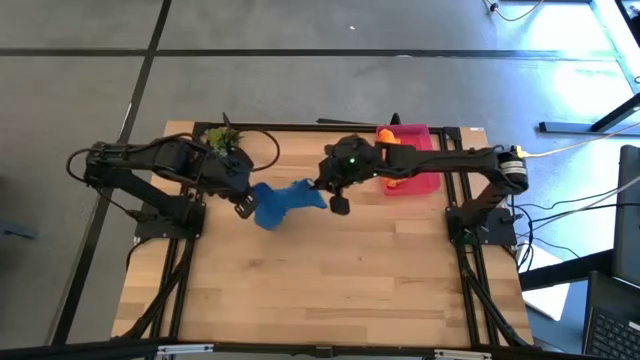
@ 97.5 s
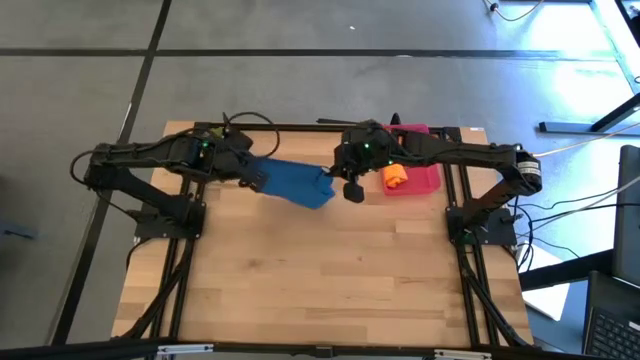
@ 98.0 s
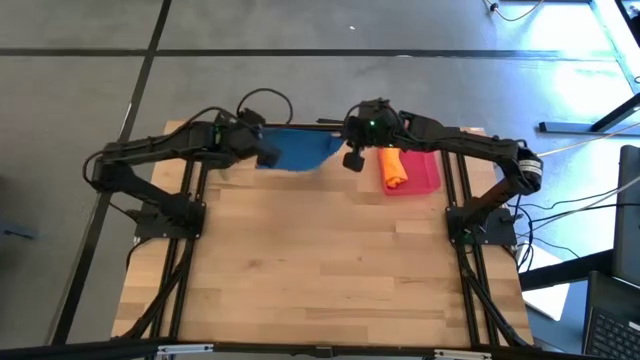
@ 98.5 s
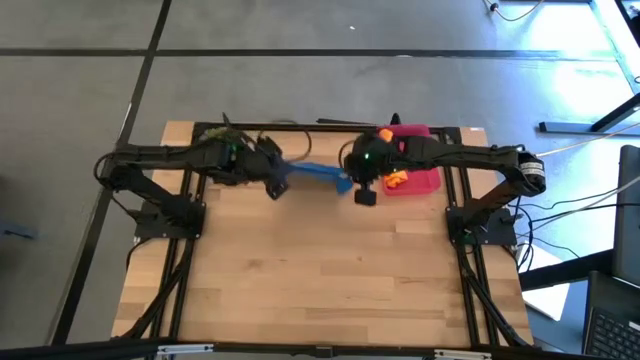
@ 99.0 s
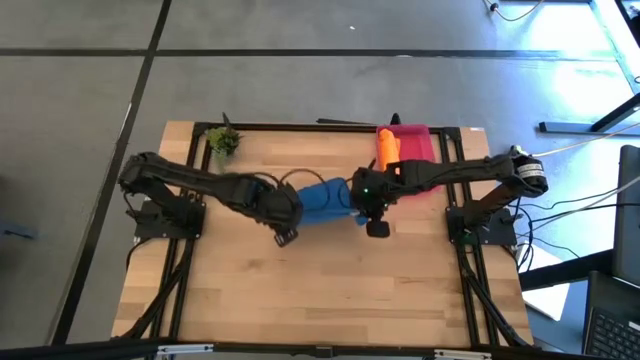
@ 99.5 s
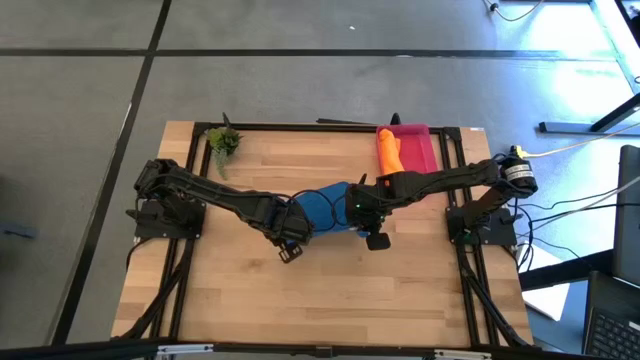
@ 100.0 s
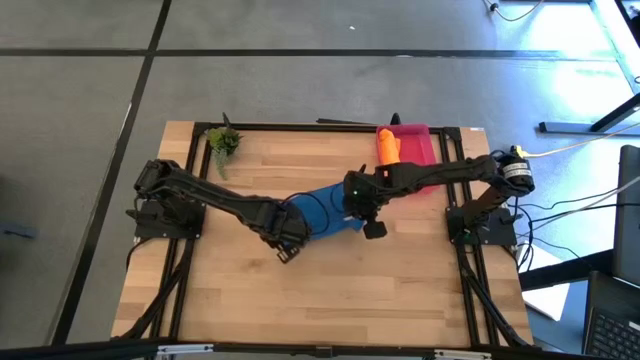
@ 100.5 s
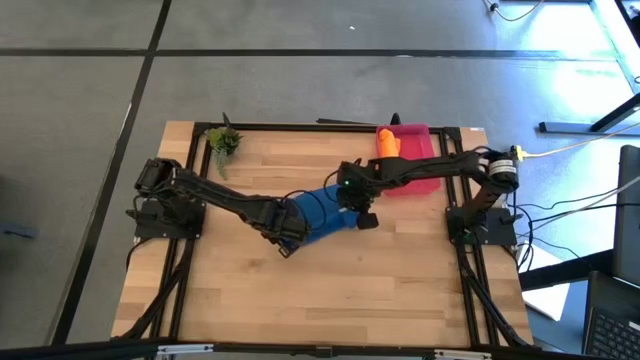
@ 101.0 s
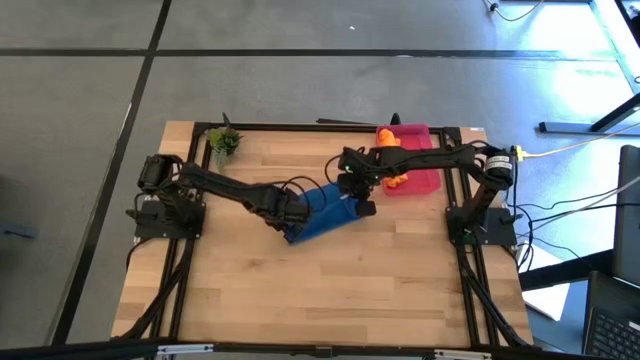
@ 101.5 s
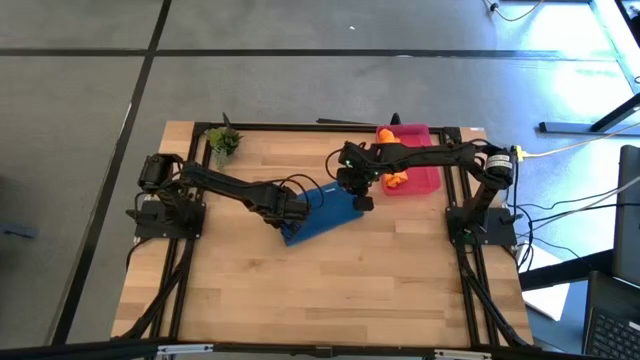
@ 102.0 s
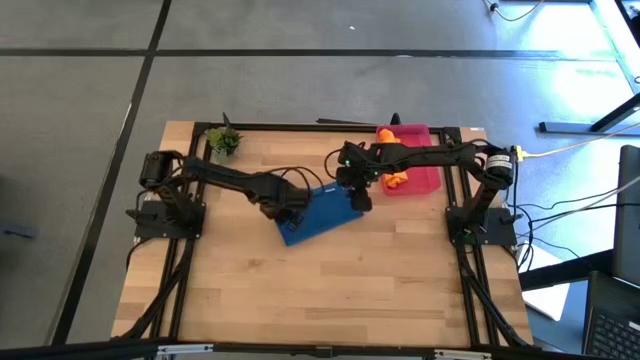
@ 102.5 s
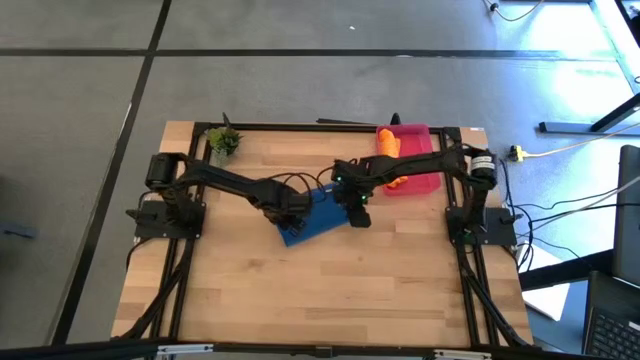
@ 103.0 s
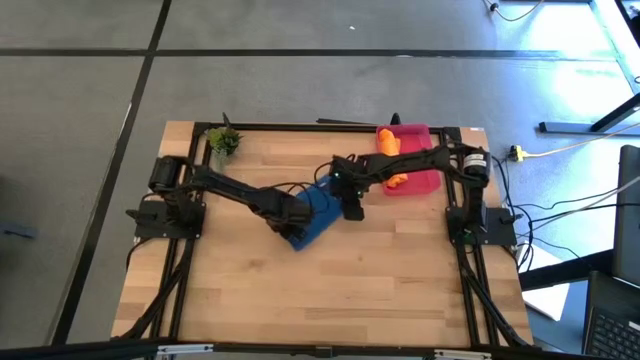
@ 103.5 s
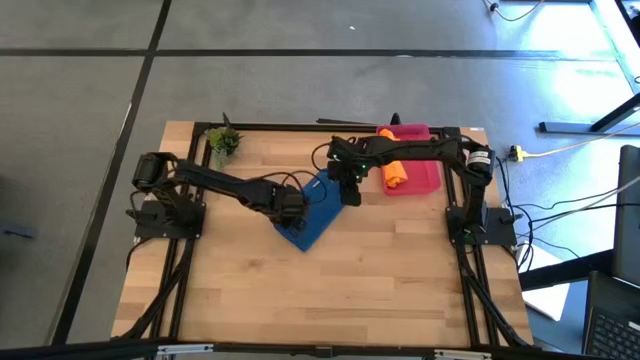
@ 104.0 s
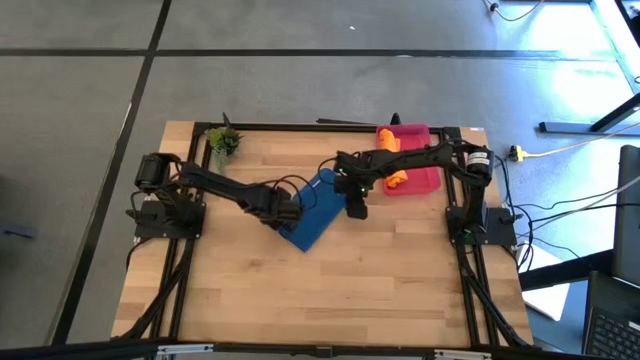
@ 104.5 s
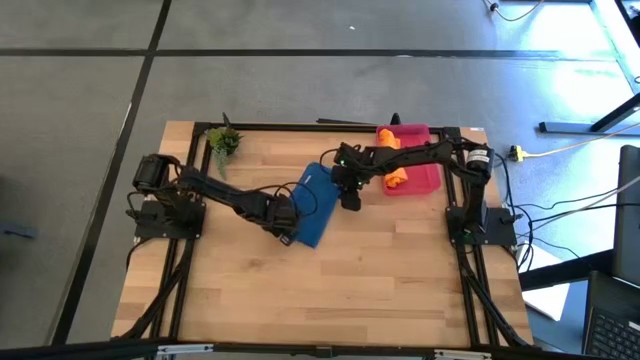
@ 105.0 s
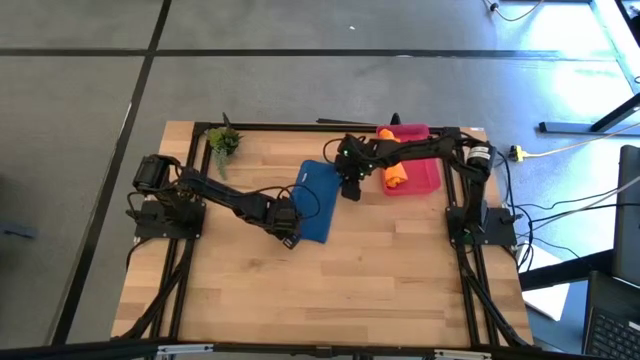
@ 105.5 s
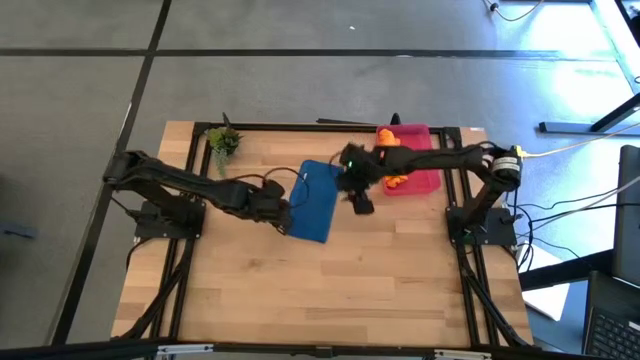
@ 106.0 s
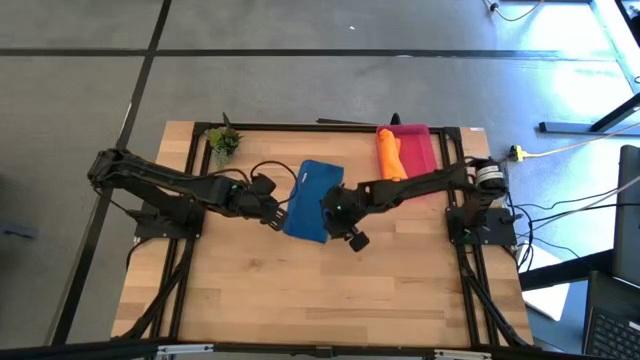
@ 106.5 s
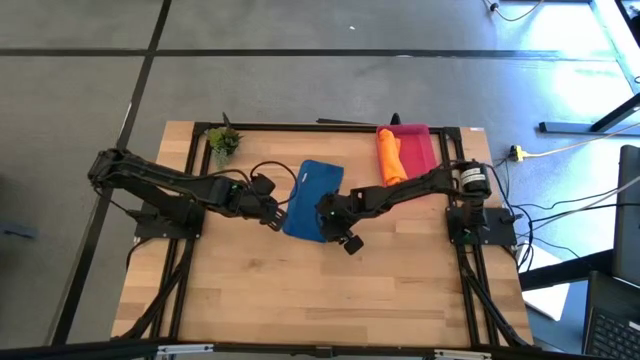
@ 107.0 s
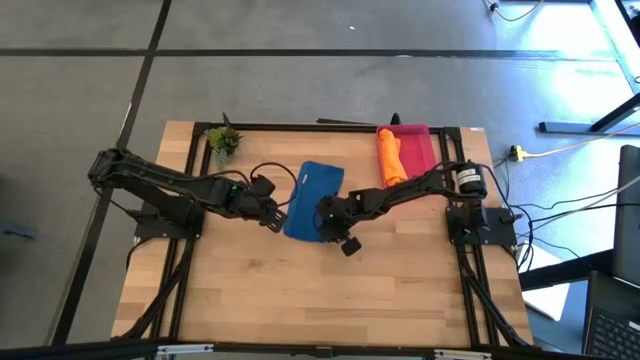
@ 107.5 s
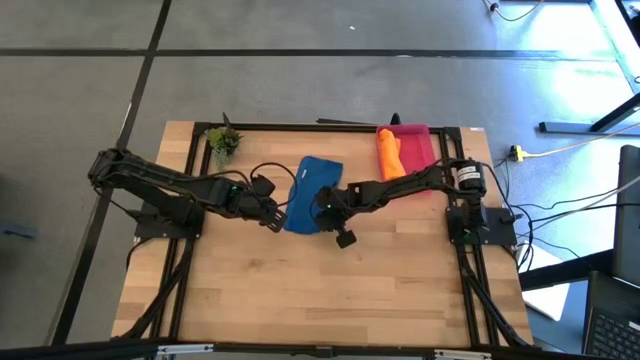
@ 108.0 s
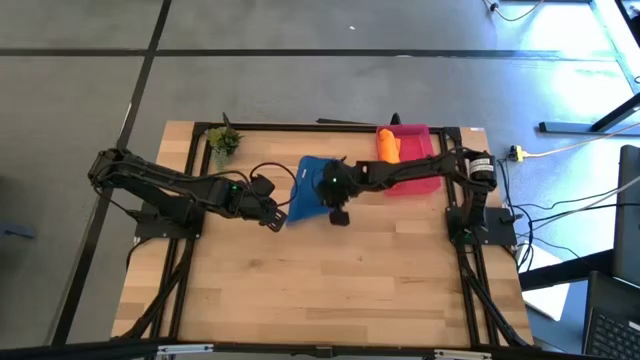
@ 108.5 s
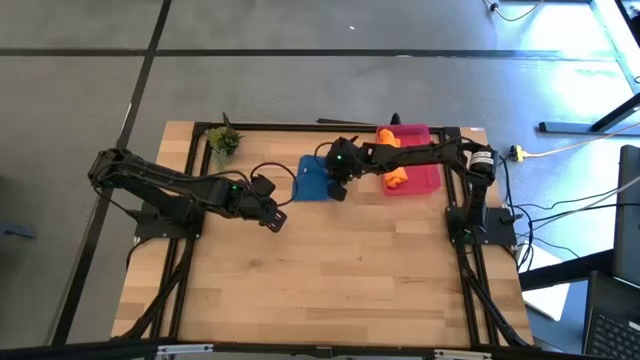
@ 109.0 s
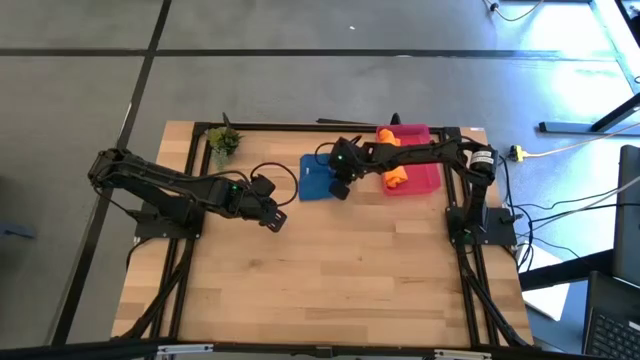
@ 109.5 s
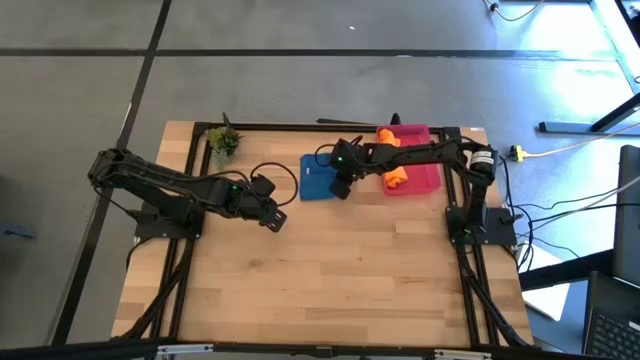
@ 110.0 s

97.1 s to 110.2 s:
Task: Roll microfiber towels into tight, uniform cylinder then place into a basket
Fold the blue microfiber towel

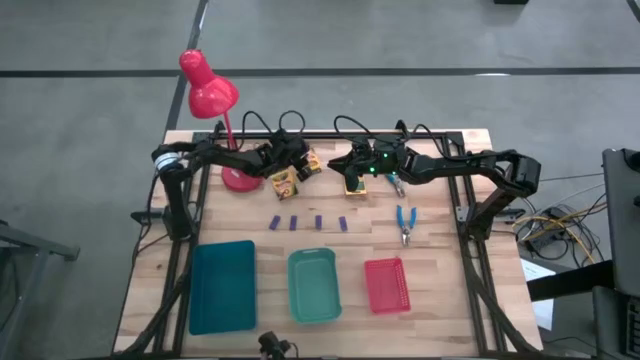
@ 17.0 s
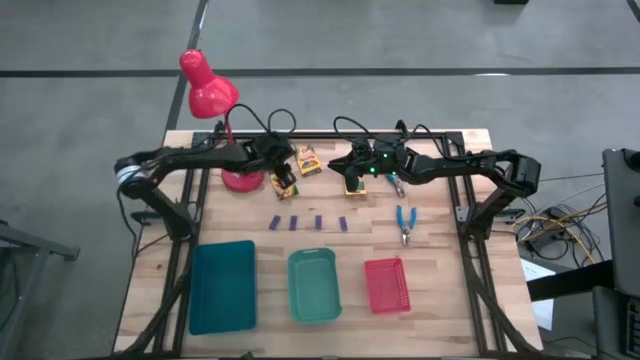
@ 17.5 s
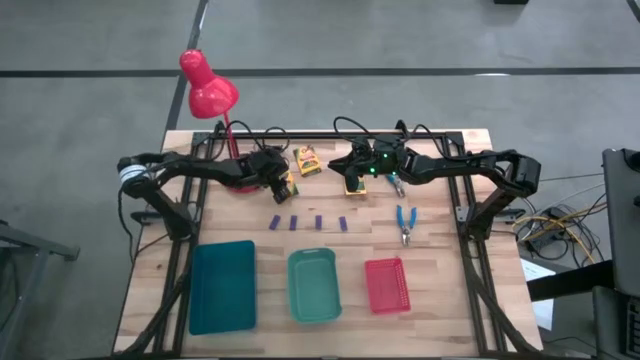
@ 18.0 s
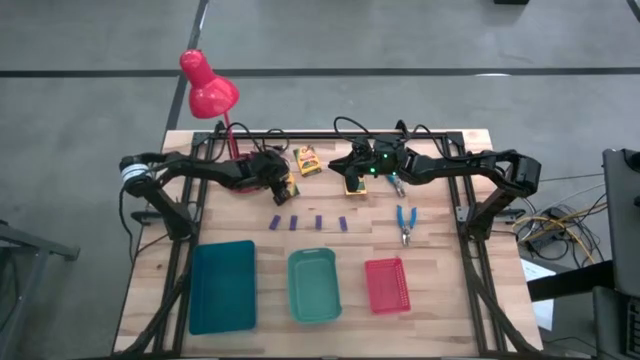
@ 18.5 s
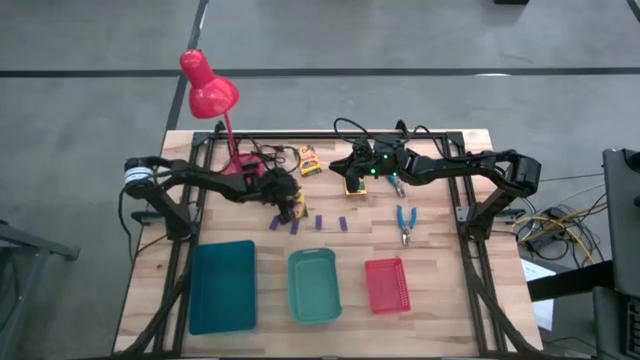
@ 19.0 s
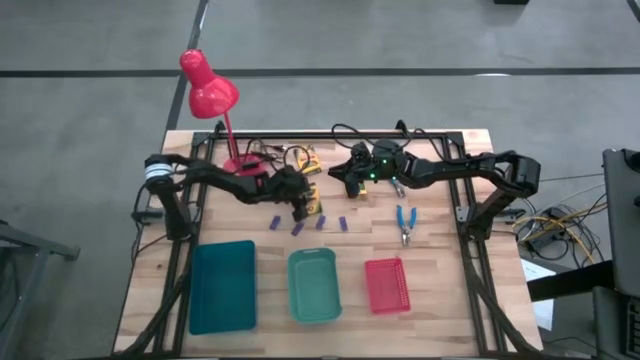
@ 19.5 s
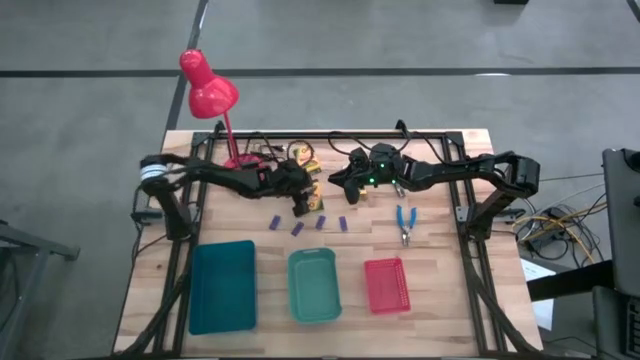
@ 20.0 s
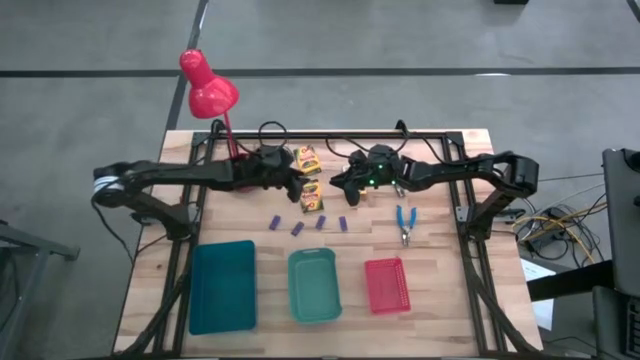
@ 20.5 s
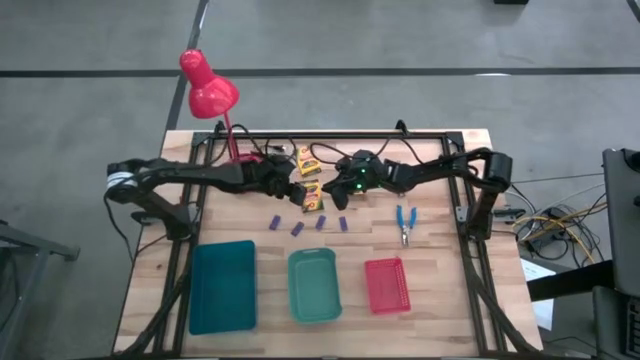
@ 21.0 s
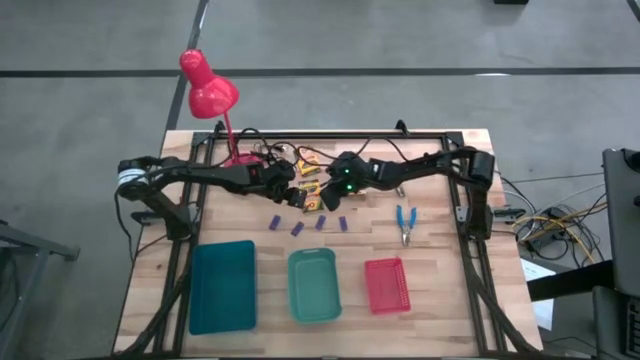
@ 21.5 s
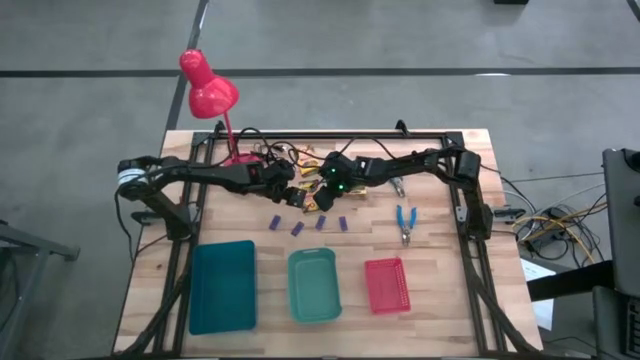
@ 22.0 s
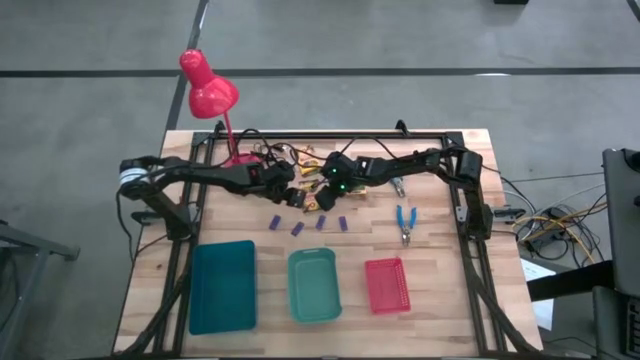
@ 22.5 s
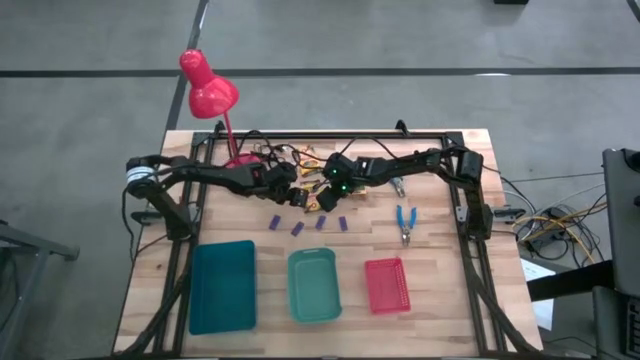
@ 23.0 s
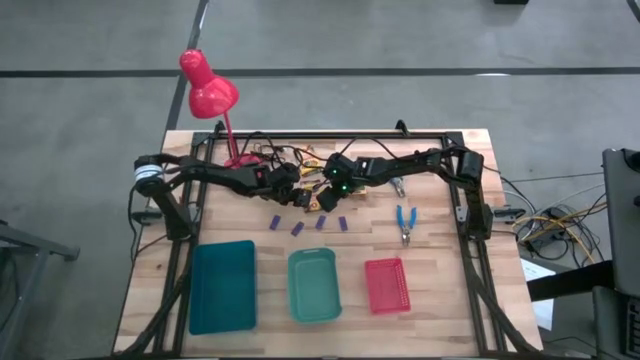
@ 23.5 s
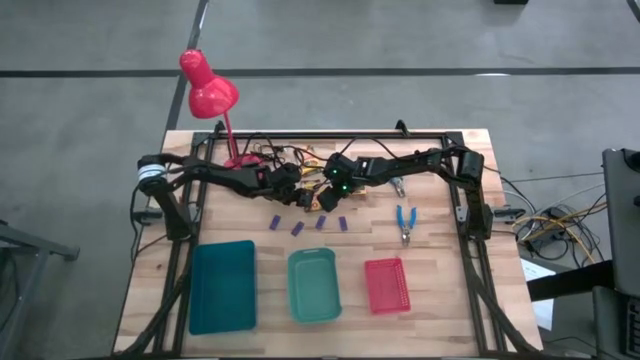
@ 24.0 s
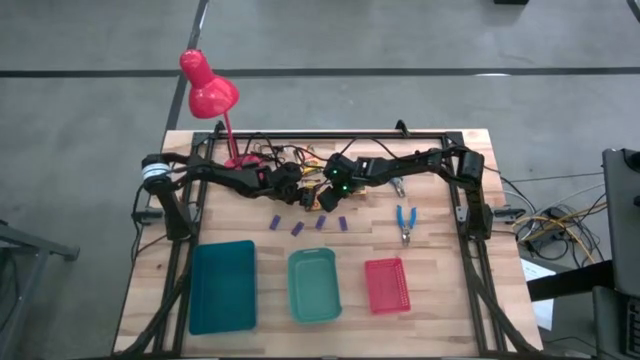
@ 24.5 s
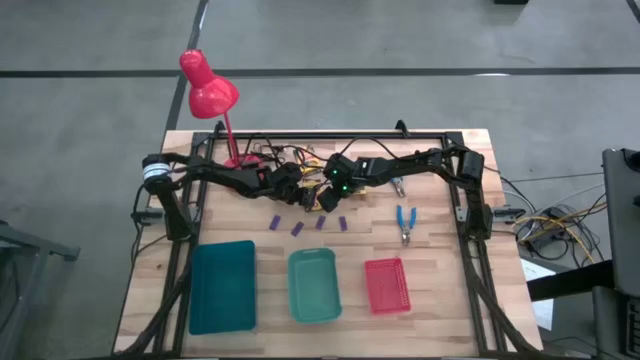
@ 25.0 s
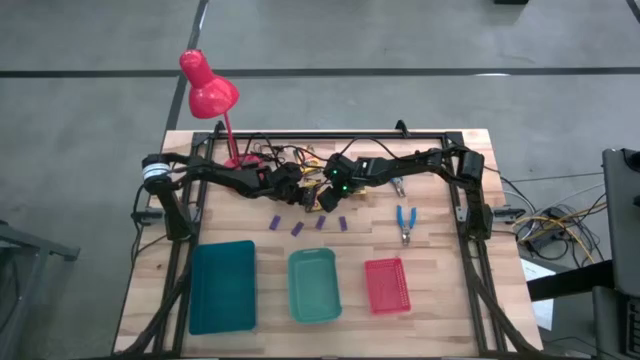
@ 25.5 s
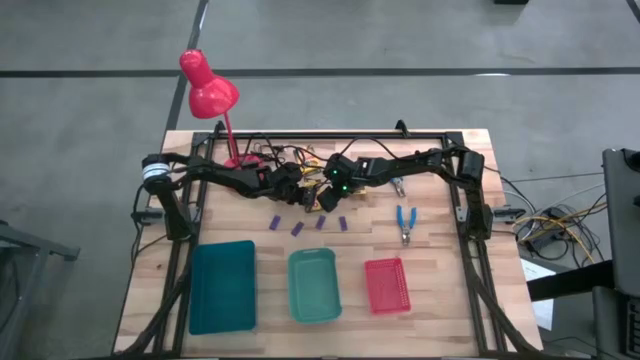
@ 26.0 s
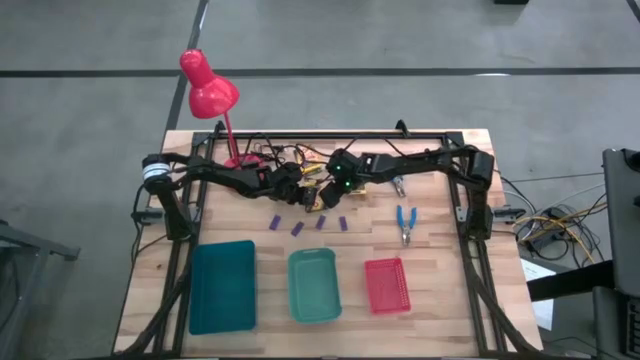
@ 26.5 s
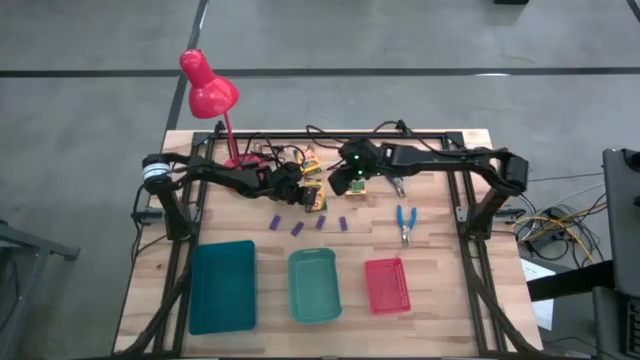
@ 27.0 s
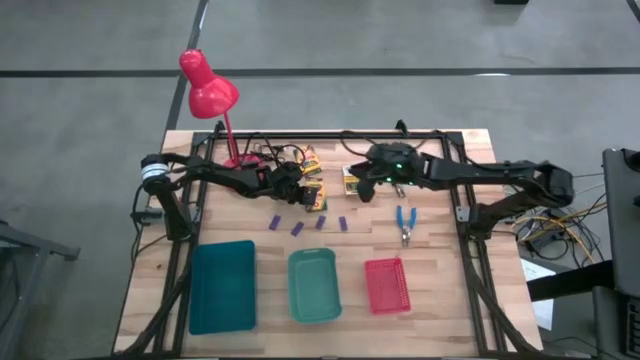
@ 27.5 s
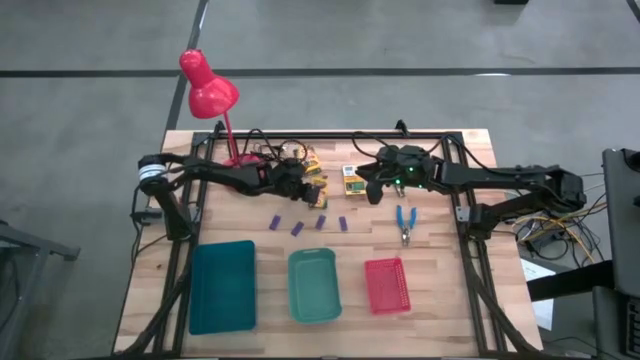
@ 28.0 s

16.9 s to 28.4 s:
Task: Pick & Place School Supplies
Put the crayon box into the blue bin
